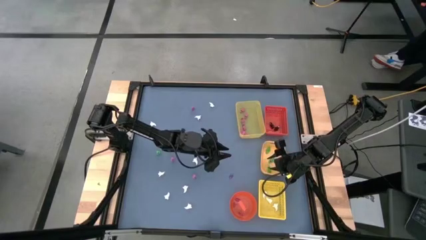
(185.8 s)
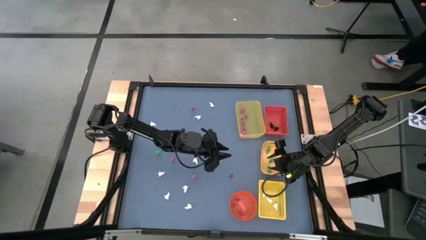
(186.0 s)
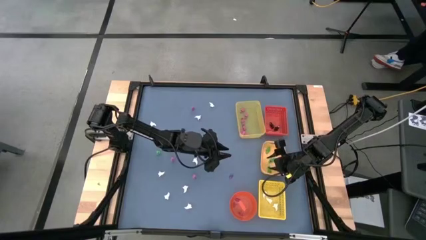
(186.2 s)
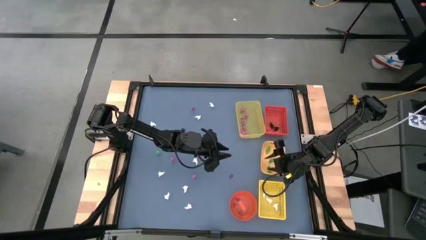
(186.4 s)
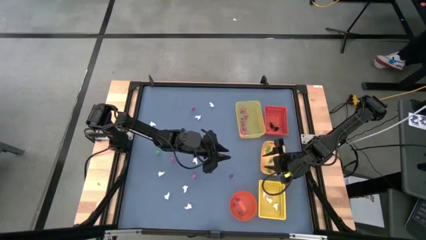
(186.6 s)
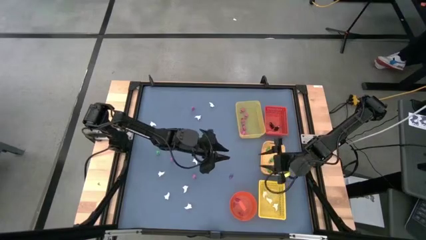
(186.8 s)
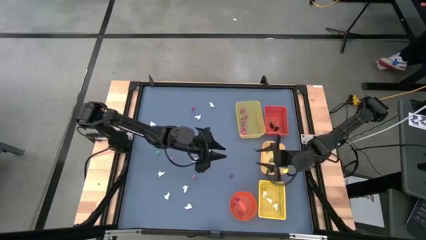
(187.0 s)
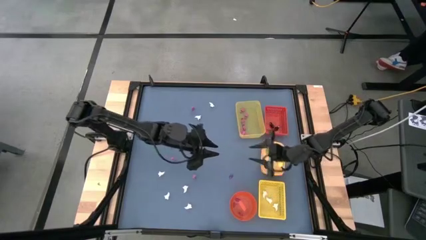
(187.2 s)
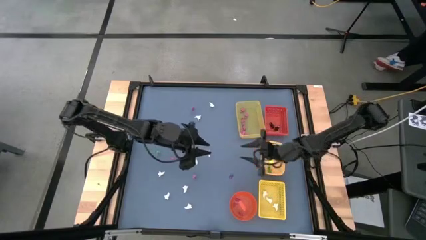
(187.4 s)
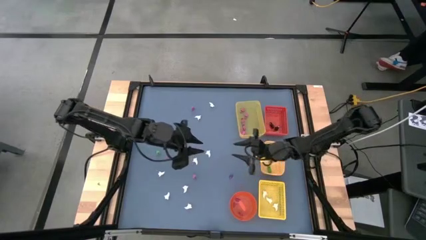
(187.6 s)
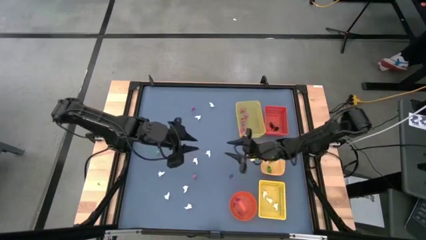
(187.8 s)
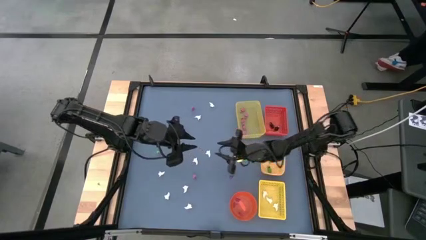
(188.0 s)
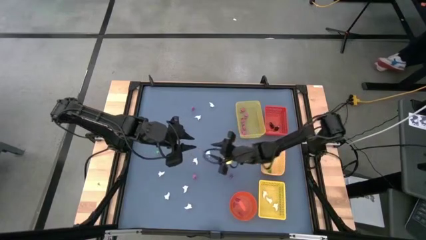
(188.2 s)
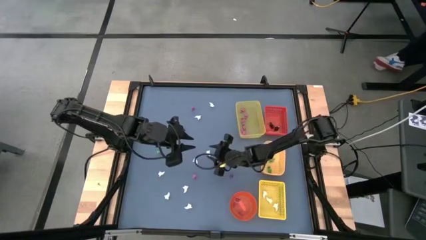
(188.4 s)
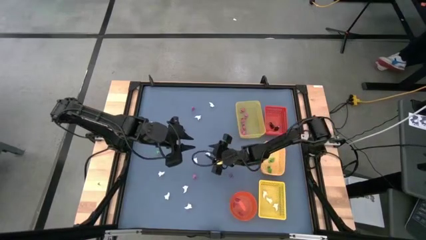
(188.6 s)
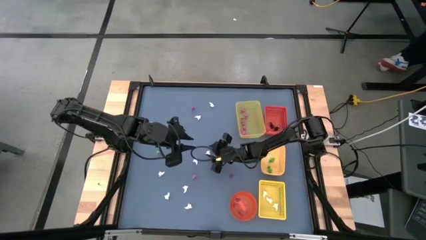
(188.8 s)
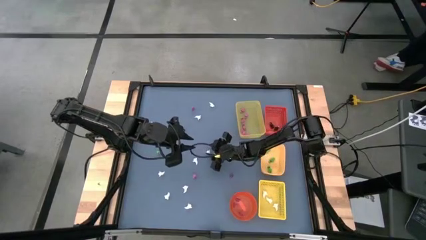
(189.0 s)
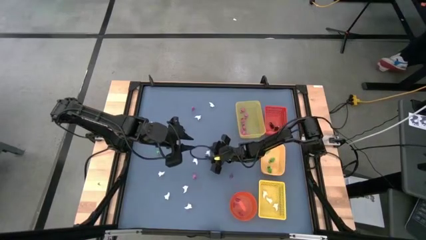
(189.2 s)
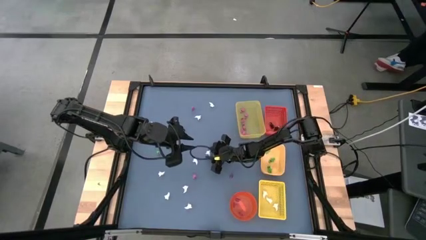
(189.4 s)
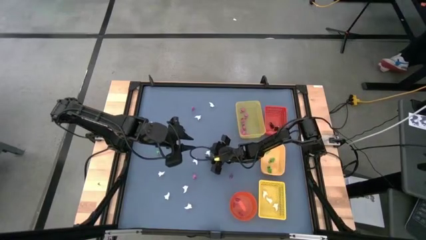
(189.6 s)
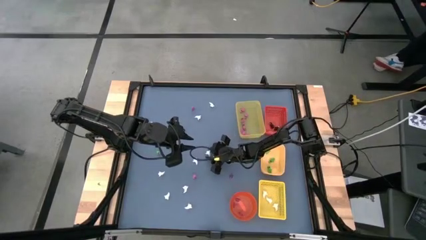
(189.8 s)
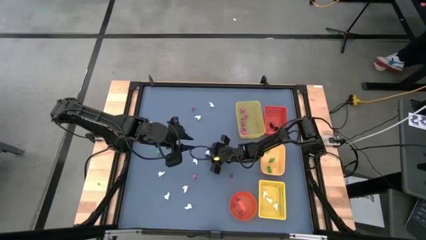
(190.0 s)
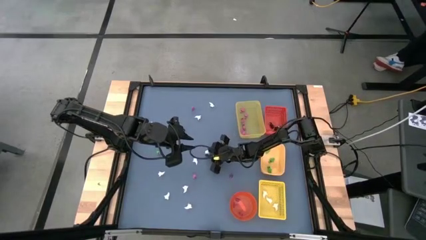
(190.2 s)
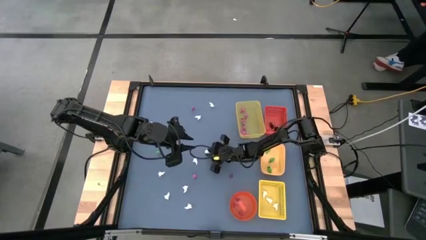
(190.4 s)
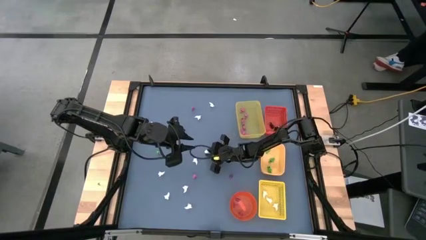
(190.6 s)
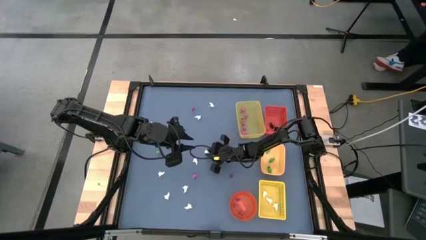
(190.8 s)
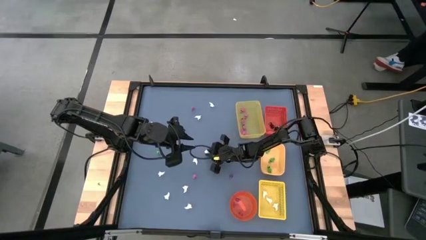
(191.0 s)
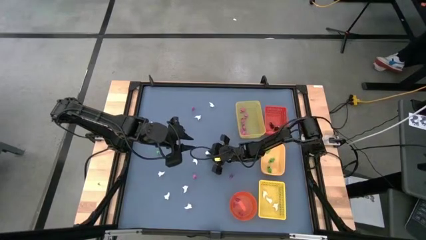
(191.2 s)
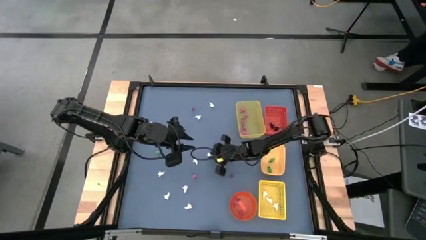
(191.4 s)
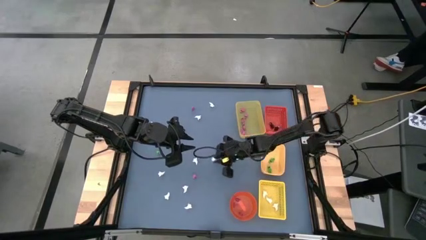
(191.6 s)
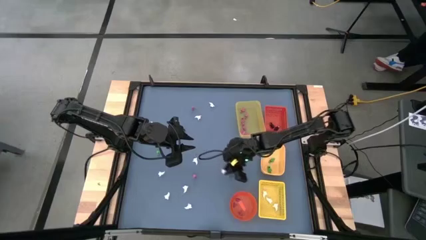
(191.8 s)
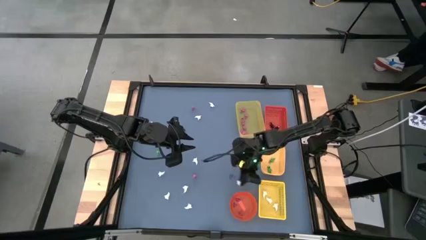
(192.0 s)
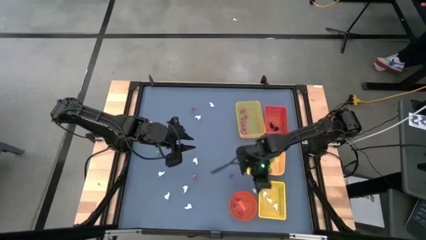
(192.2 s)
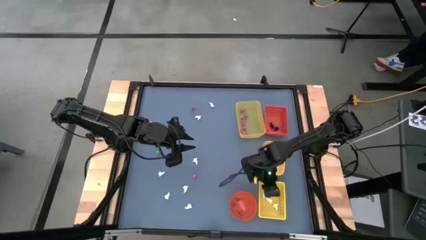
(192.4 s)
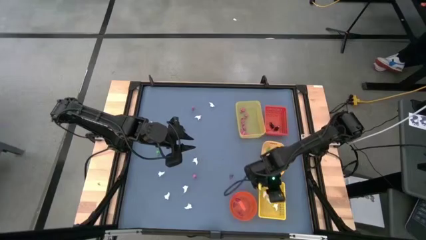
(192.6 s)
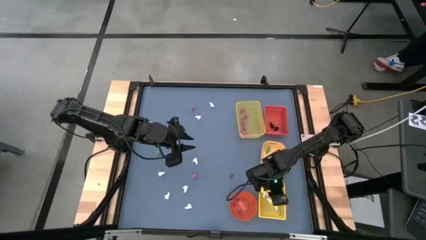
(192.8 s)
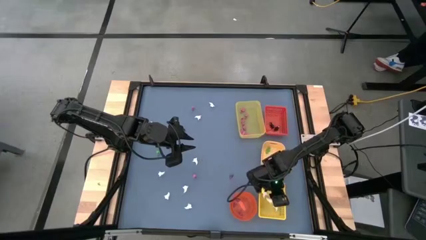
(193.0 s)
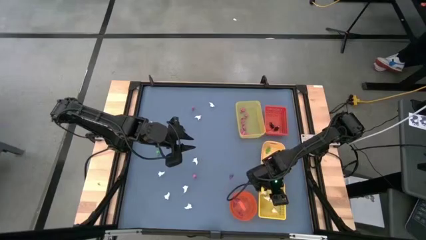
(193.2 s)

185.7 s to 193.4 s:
Task: Sort Halloween decoration
Put the white ghost toy into the yellow box

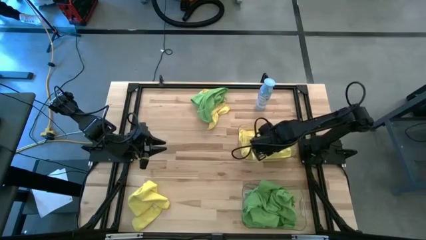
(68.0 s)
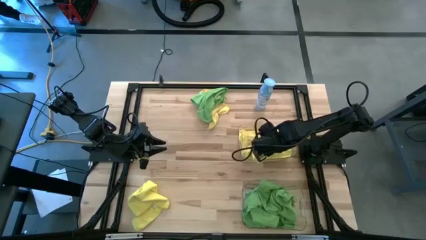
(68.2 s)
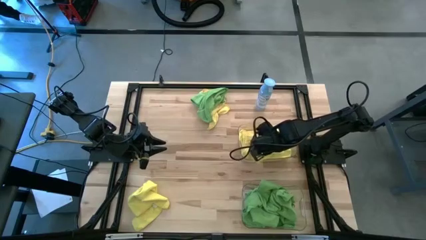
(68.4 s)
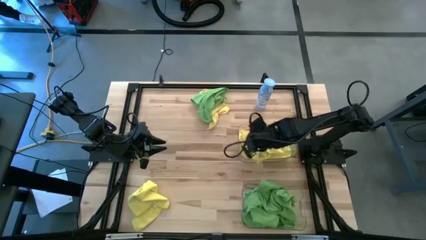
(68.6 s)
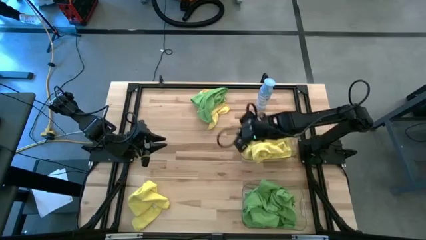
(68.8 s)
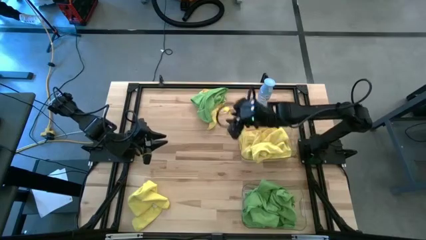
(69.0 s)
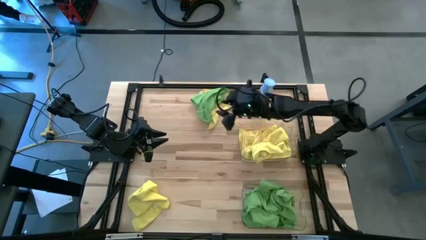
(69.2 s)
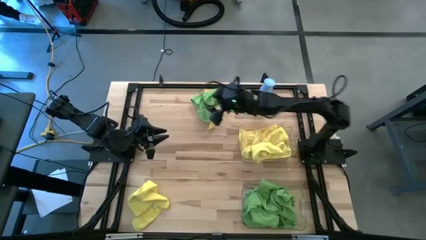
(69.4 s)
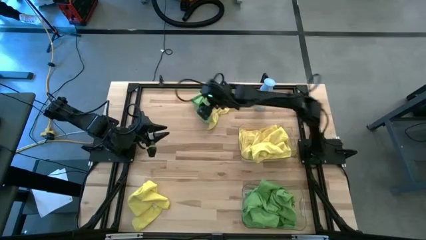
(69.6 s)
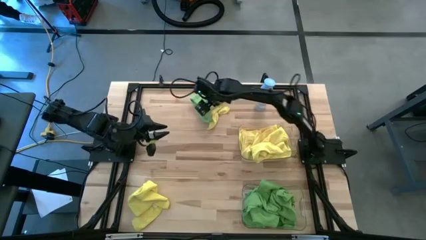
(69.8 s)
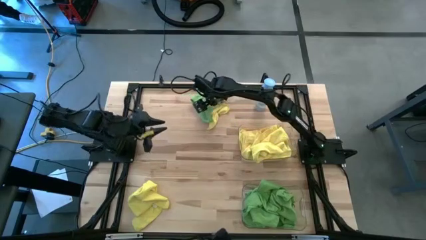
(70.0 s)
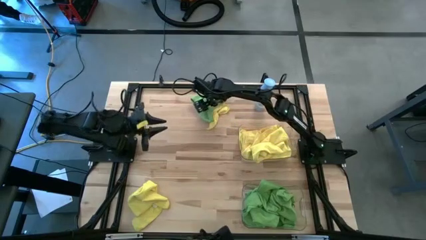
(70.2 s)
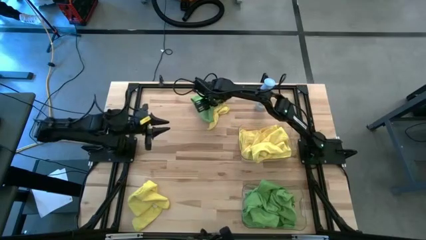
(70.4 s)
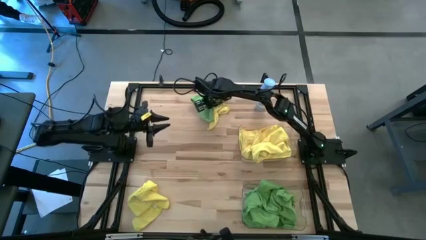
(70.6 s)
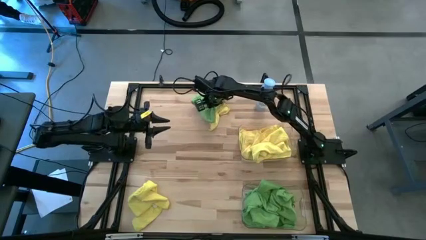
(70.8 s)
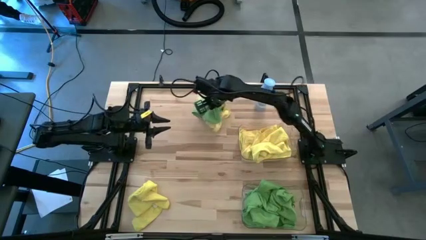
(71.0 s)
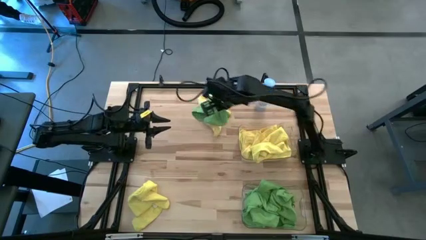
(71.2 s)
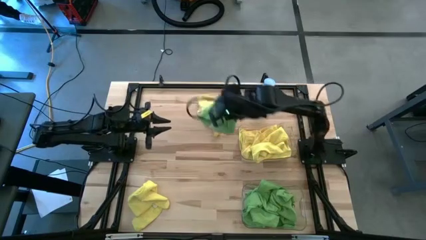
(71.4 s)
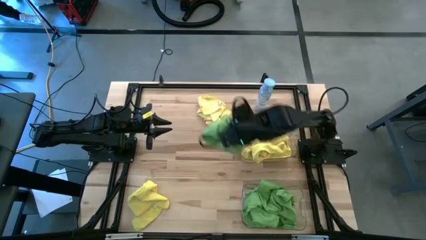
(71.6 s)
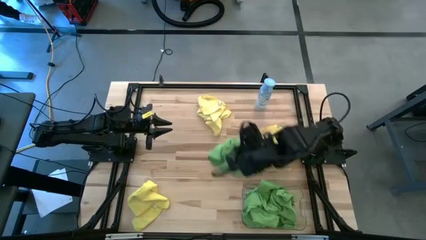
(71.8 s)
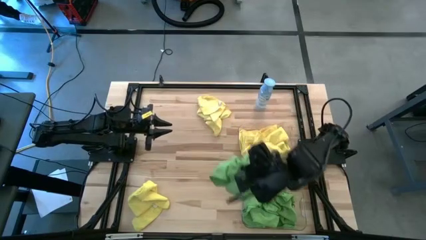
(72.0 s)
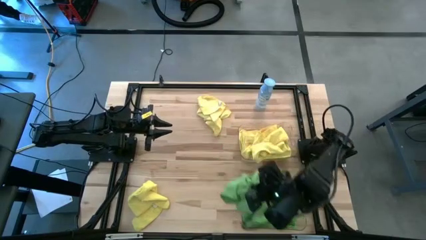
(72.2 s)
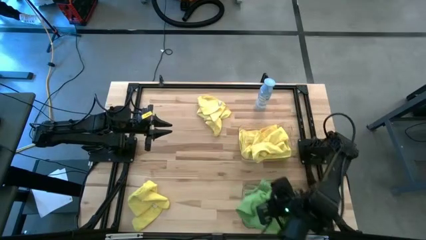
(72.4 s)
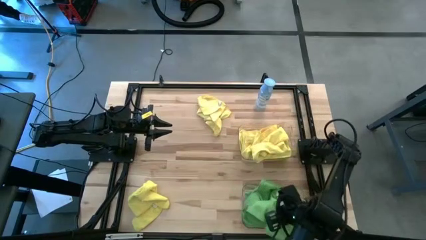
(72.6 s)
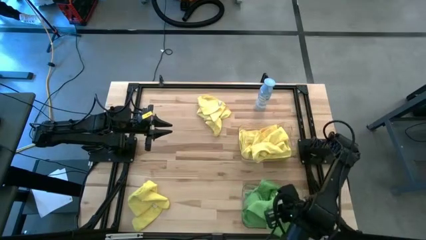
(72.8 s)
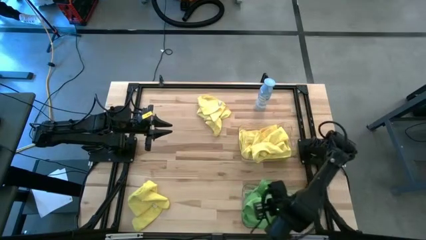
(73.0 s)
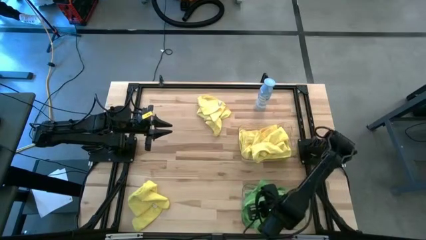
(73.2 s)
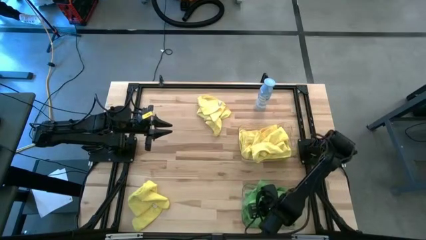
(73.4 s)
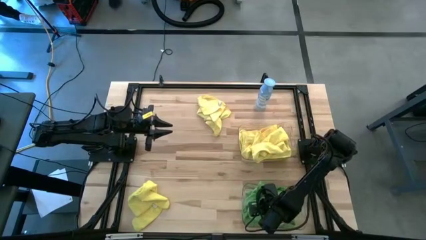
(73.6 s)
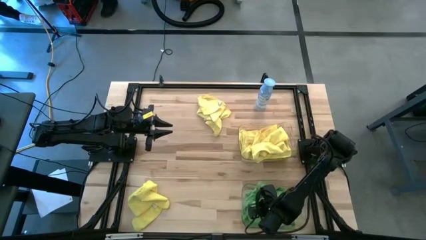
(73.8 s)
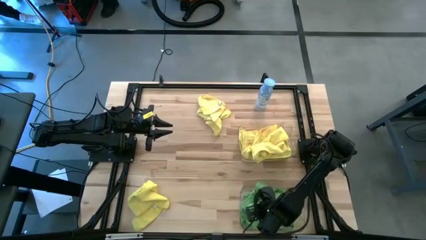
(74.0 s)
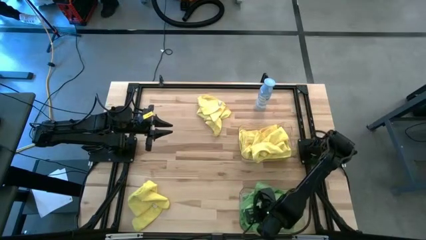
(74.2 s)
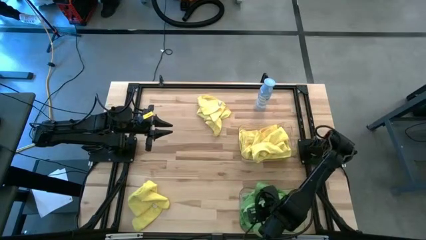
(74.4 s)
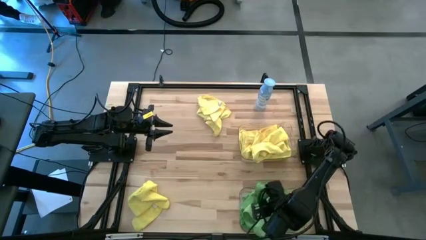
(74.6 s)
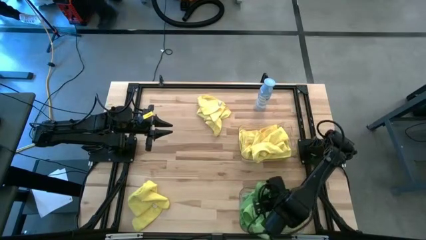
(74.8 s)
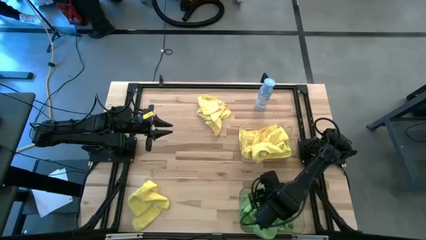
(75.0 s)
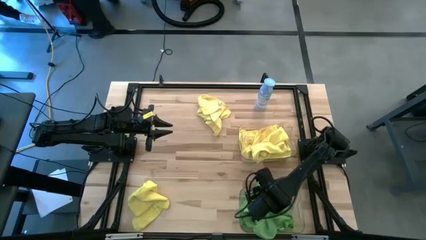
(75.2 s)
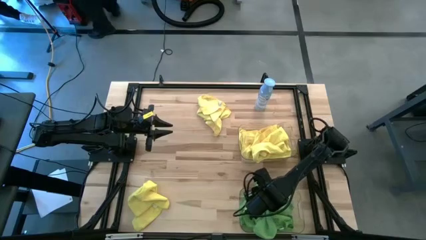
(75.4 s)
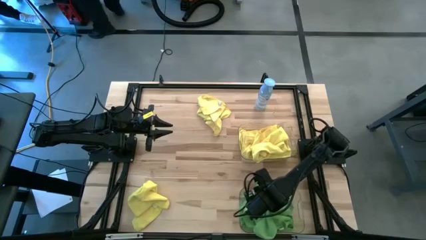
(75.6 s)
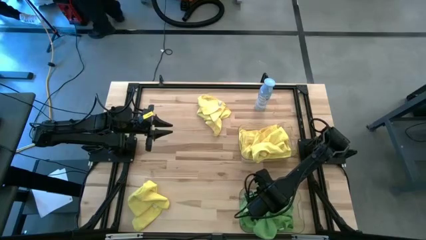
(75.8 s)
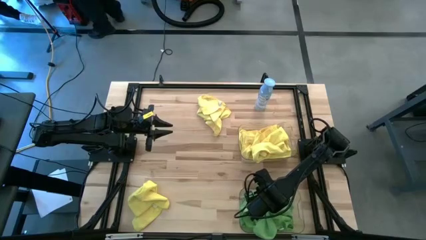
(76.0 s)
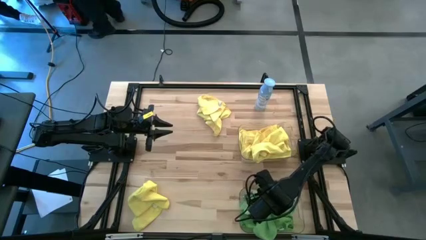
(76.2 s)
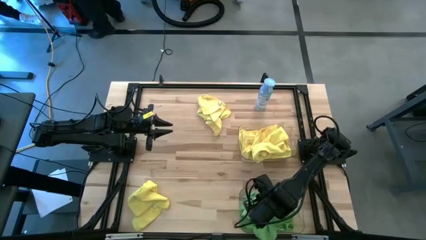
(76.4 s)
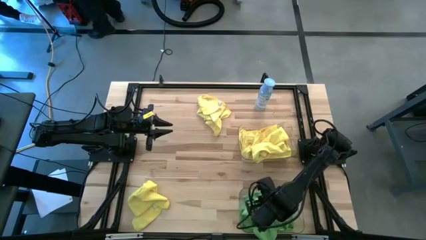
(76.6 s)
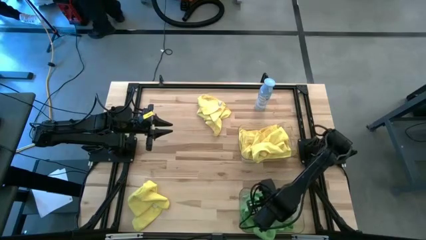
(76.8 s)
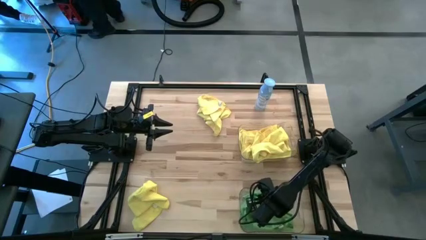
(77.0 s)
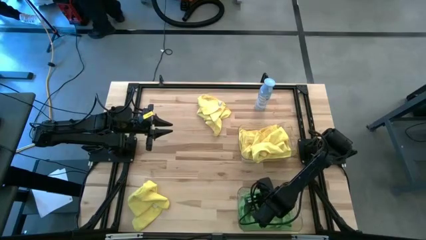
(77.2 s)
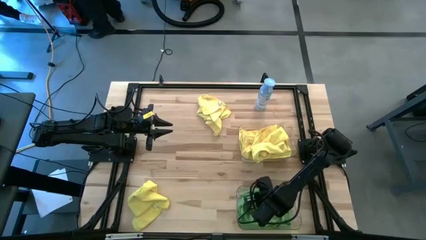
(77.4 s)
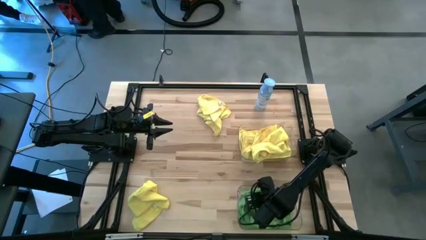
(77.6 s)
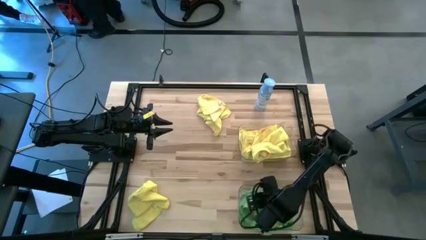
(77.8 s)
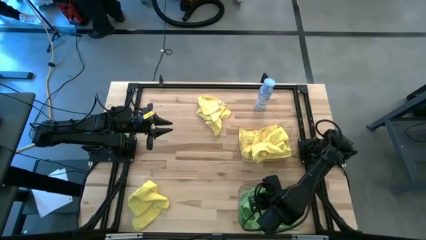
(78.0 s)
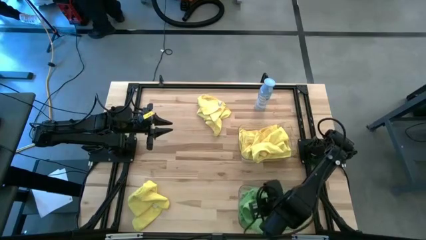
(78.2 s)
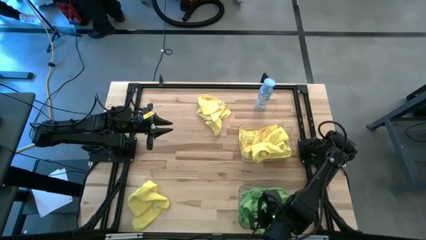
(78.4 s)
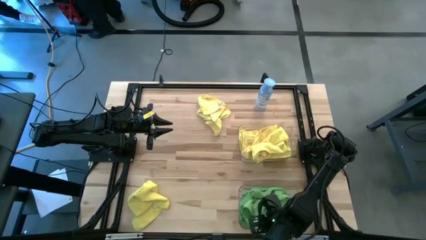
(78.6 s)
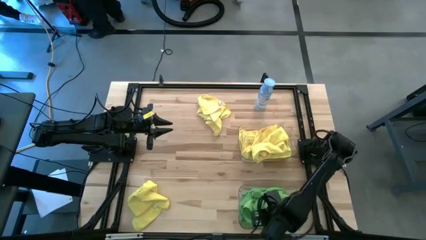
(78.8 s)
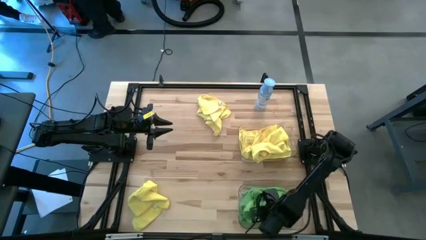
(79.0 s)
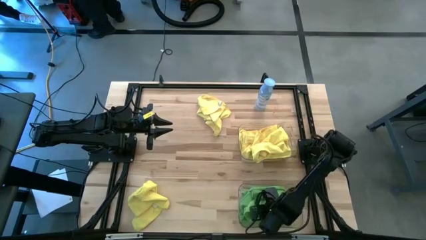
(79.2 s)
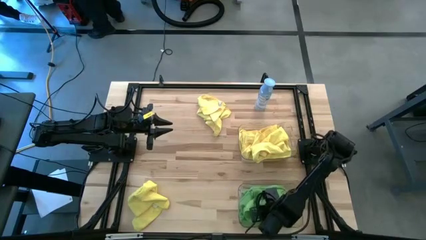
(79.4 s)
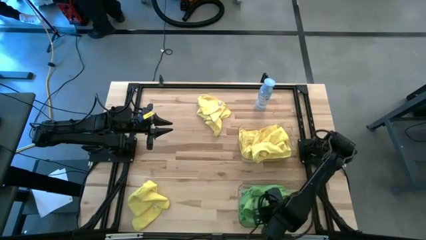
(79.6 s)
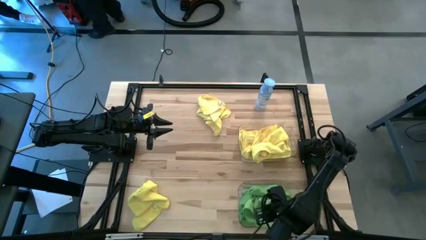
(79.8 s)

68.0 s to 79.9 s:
Task: Sort microfiber towel by color & place in baskets
Put the green microfiber towel into the bottom transparent bin
